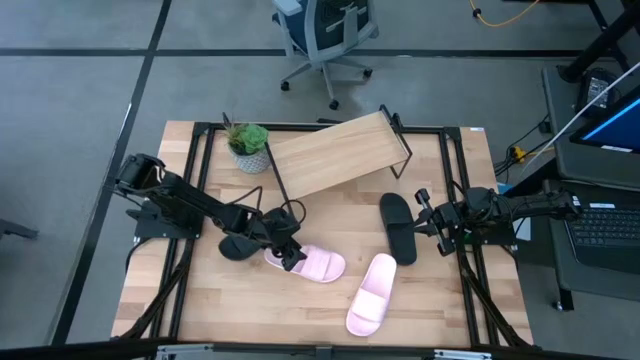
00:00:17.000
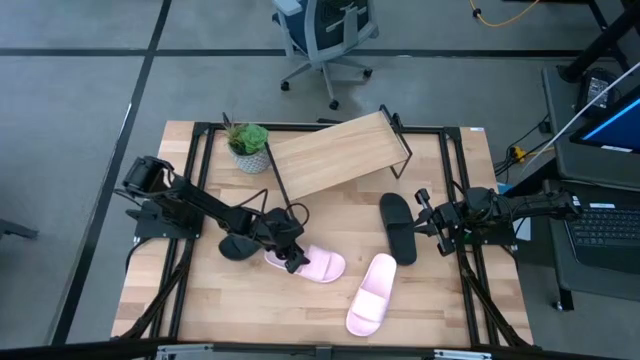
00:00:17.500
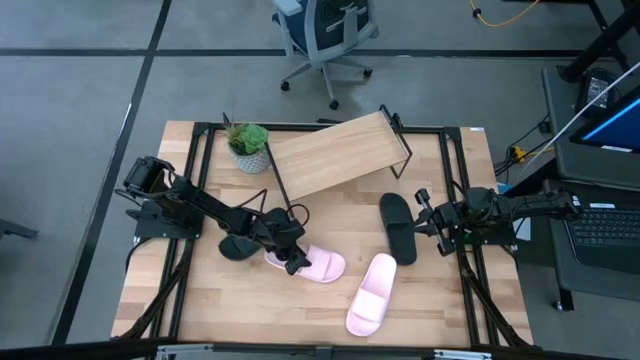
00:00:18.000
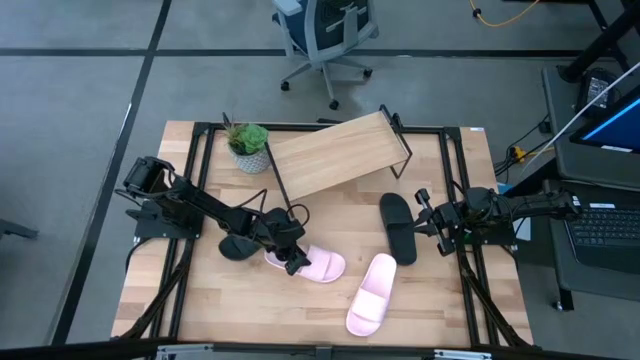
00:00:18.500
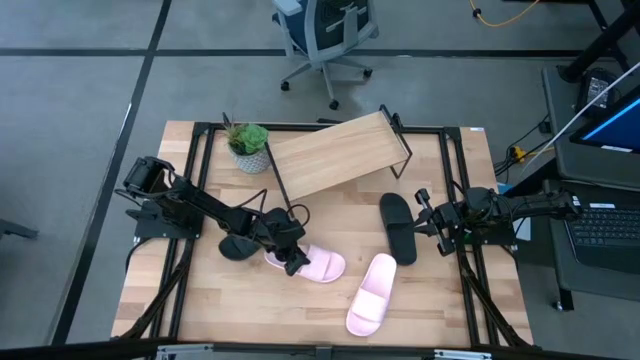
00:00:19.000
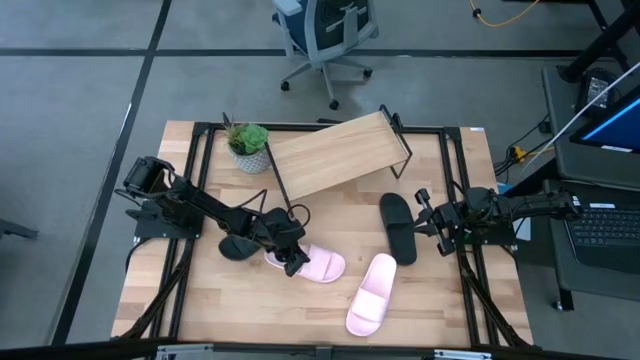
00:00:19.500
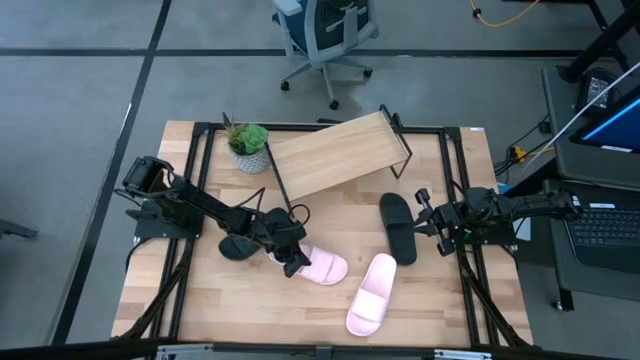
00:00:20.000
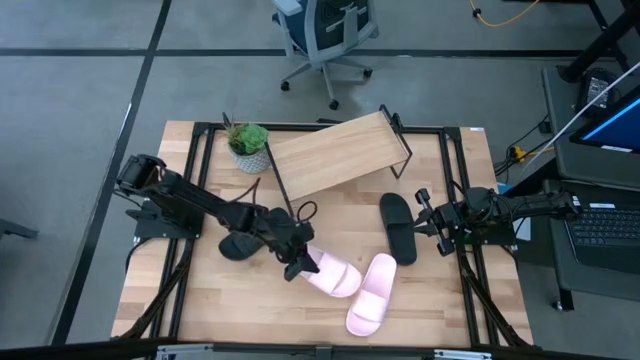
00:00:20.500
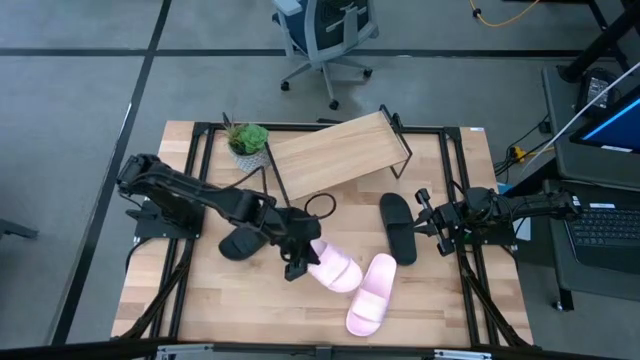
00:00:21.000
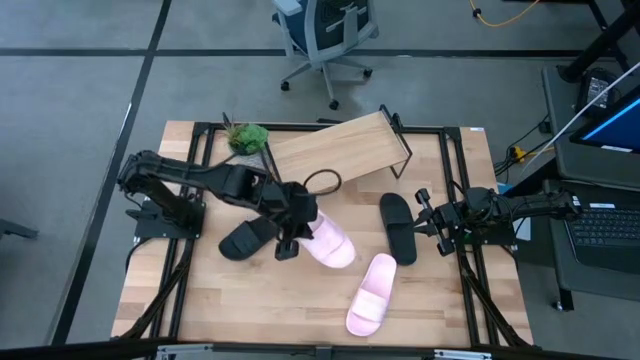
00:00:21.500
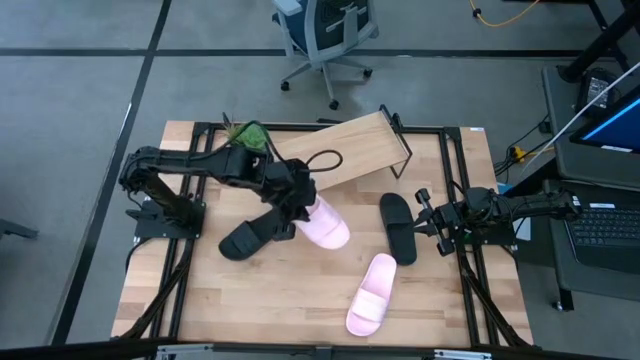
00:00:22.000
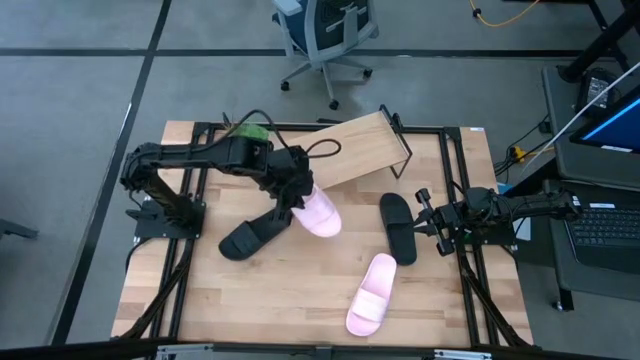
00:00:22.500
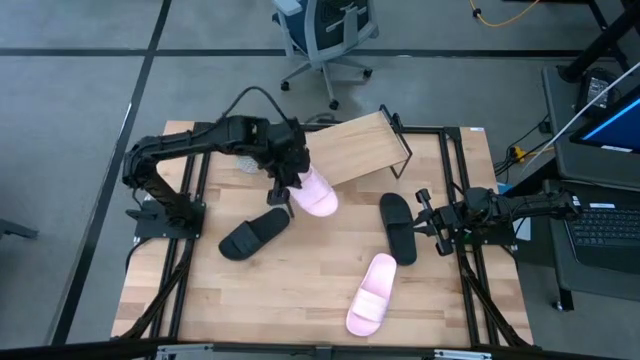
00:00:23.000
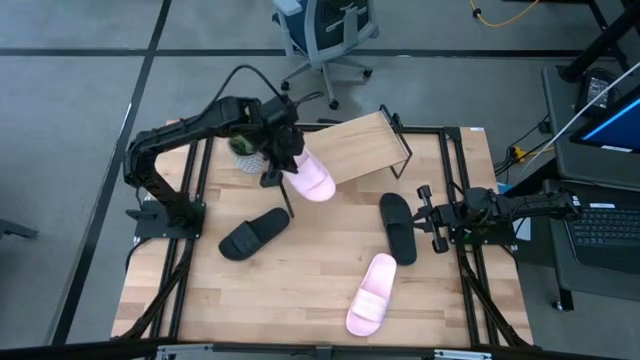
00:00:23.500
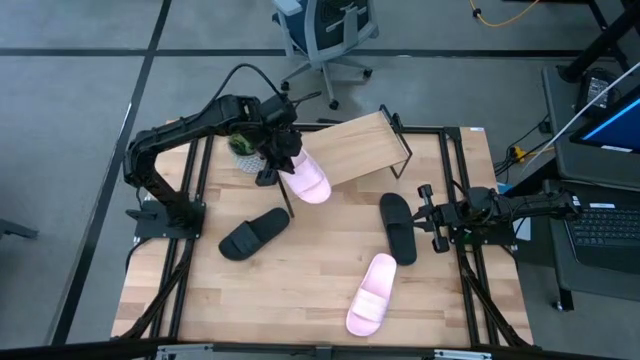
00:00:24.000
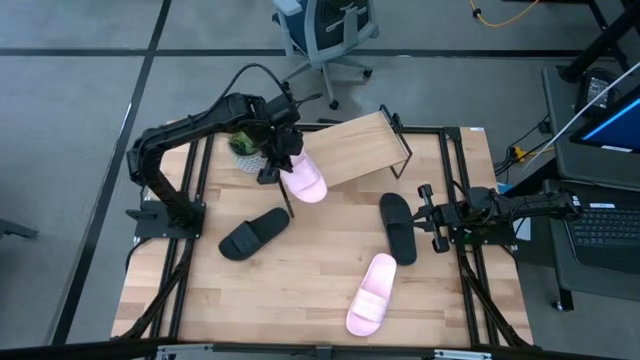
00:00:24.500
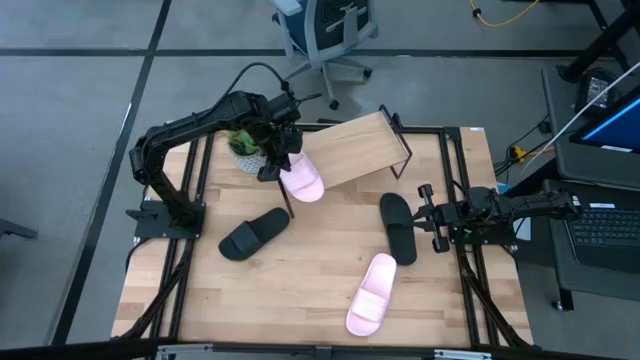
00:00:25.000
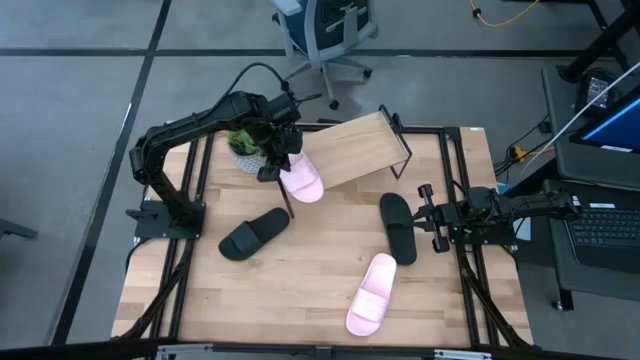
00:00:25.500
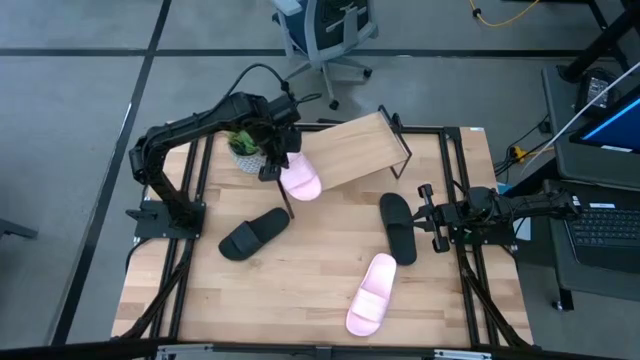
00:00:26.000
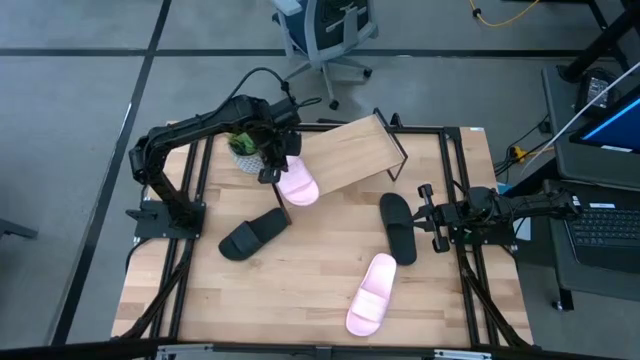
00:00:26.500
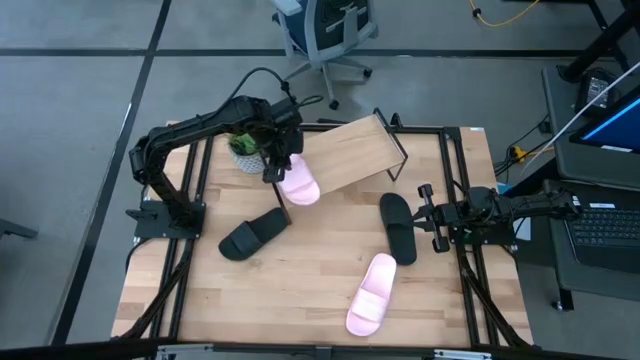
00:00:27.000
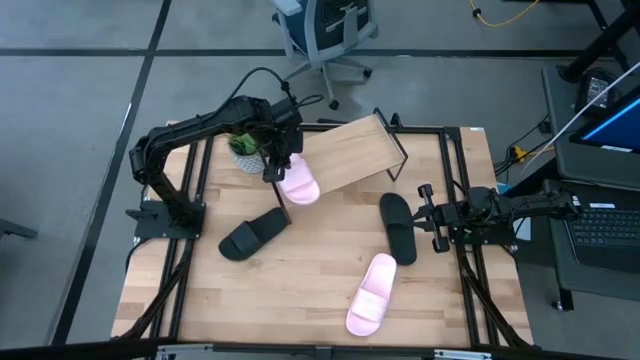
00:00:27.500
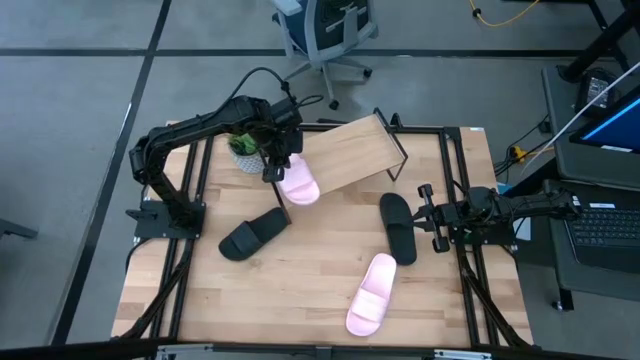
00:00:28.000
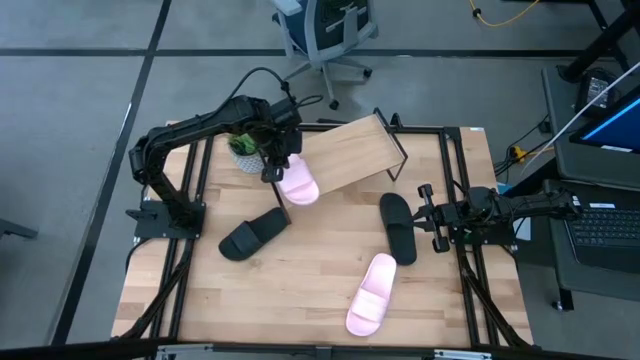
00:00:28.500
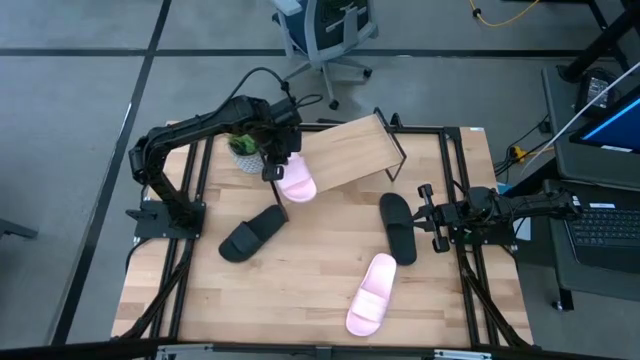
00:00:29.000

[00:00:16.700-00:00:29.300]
Task: Pick and place slides into the shelf
Put the left pink slide on the shelf

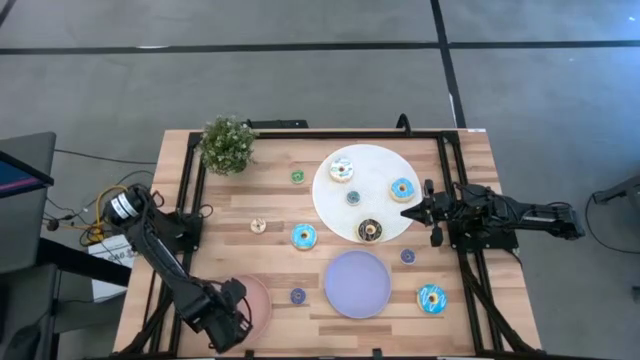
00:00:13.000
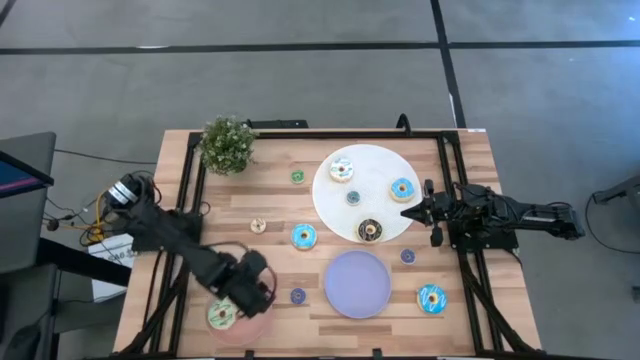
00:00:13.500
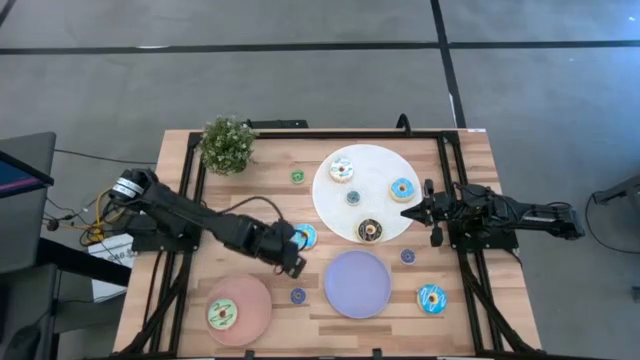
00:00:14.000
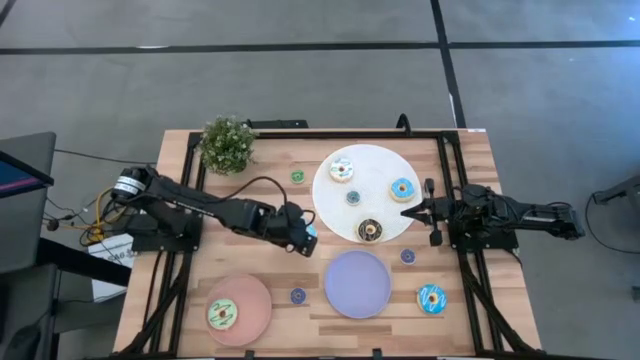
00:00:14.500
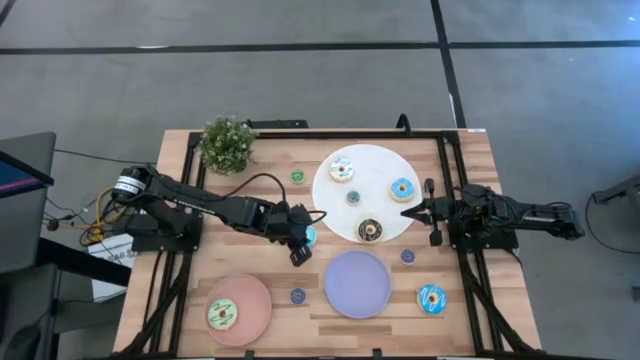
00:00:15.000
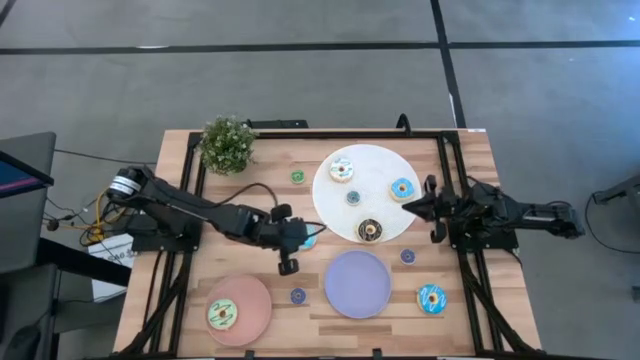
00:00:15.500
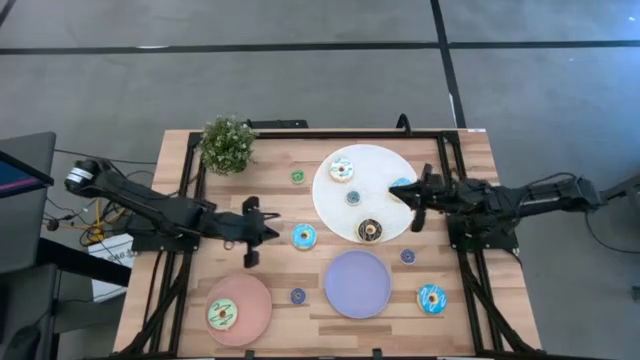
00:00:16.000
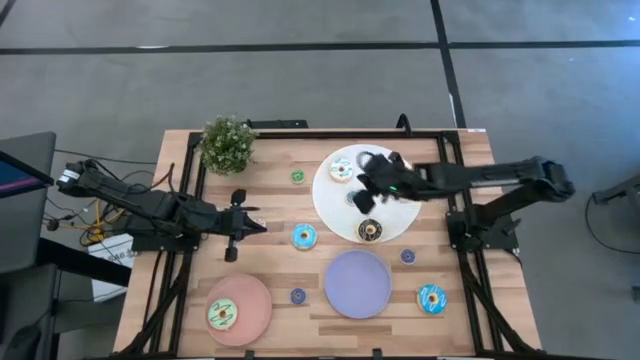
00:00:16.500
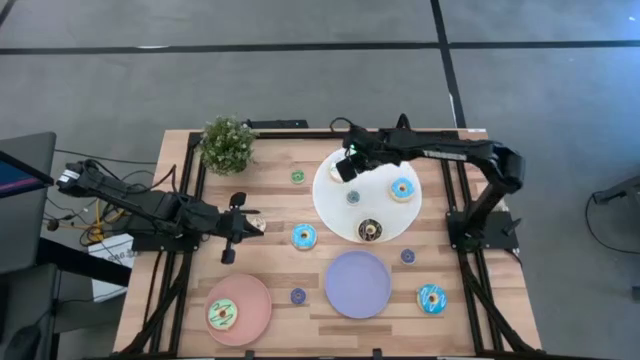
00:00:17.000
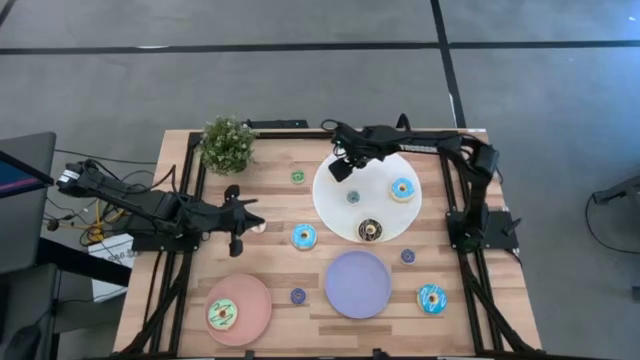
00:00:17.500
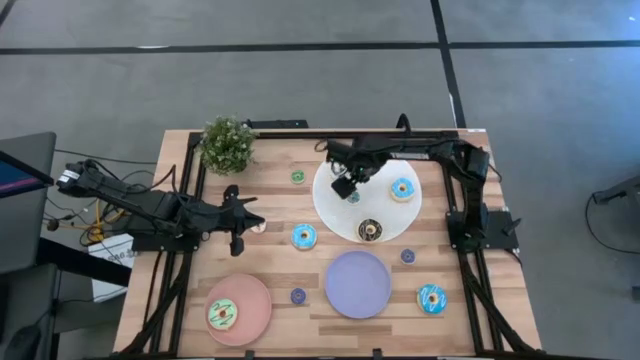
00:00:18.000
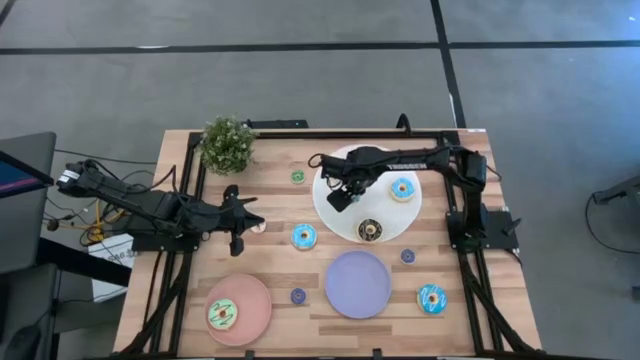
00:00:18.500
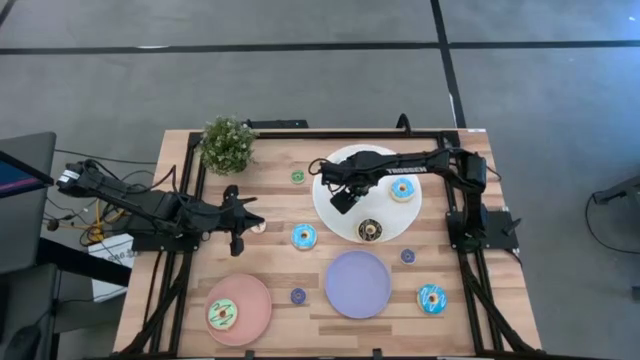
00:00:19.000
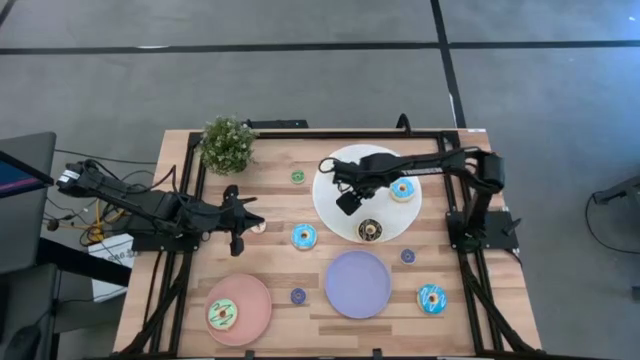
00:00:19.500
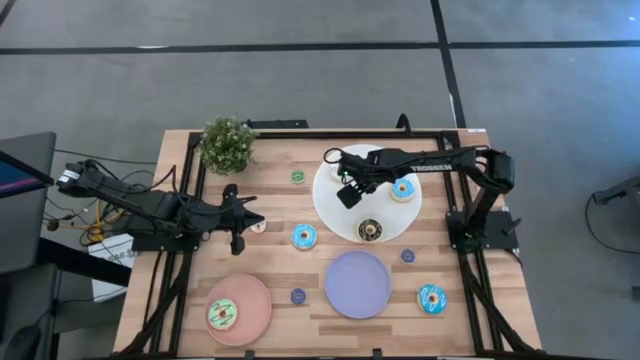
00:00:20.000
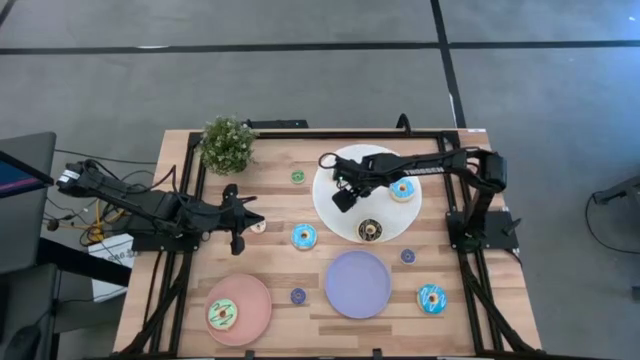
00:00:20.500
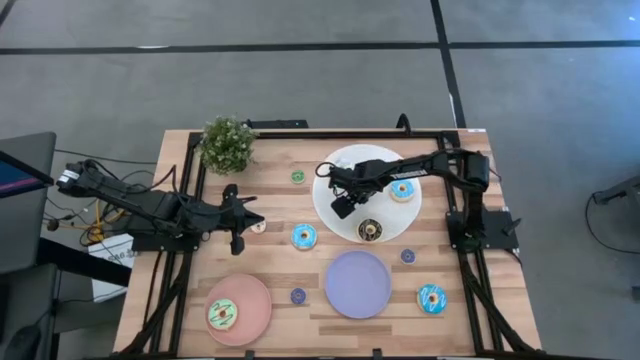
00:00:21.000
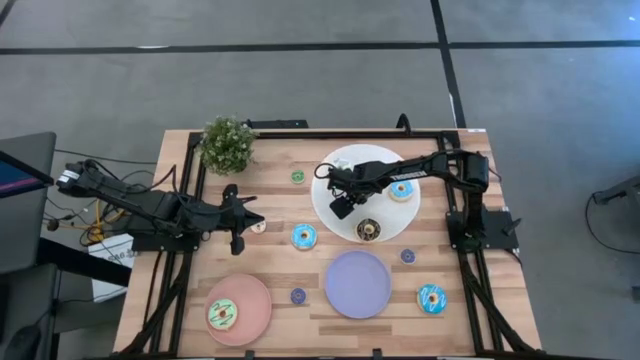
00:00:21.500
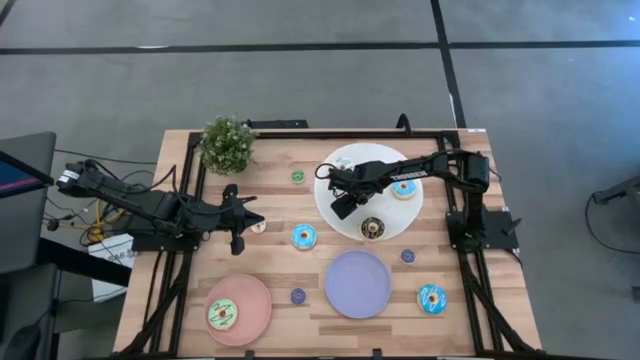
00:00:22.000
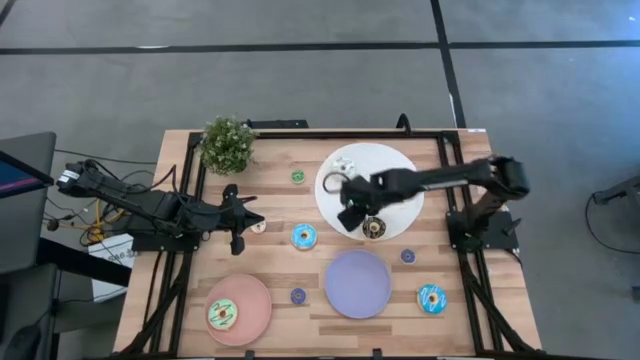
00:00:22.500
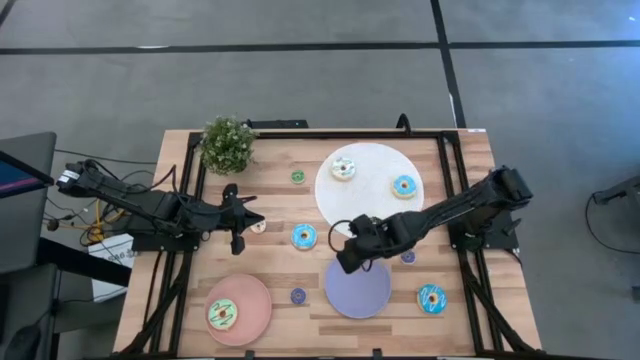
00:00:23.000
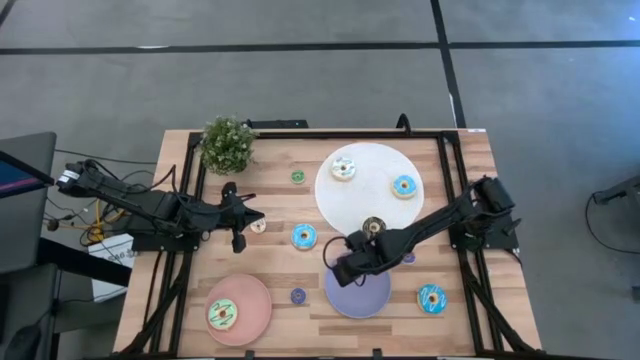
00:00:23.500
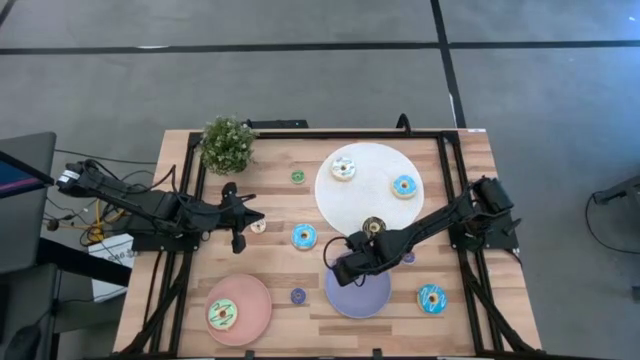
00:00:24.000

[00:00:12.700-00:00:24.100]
Task: Pick & Place donuts
Put the small dark green donut on the purple plate
